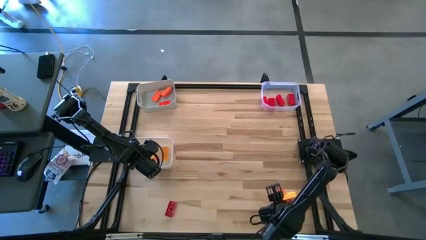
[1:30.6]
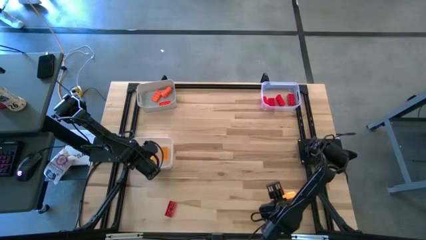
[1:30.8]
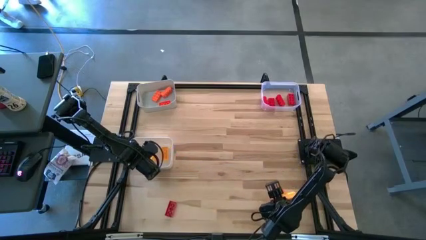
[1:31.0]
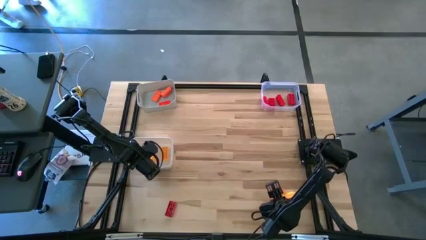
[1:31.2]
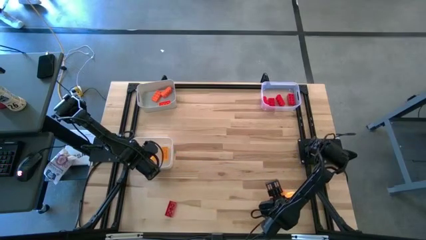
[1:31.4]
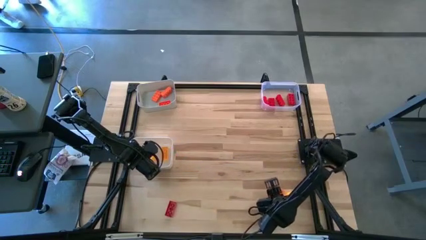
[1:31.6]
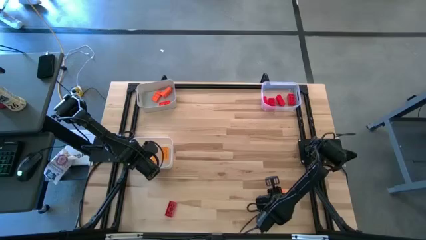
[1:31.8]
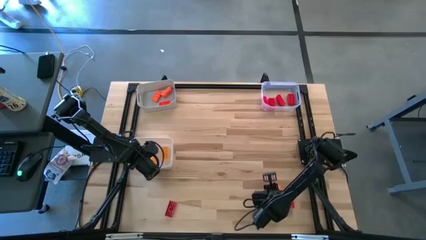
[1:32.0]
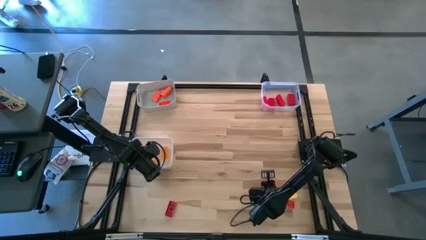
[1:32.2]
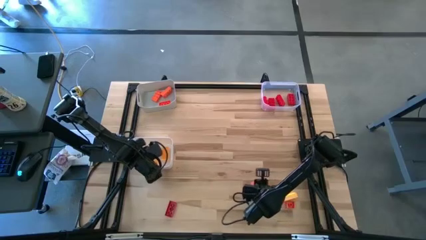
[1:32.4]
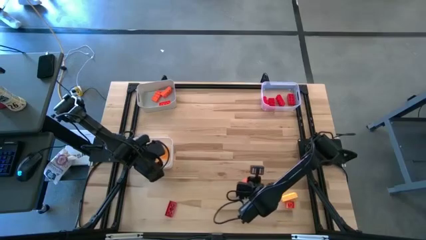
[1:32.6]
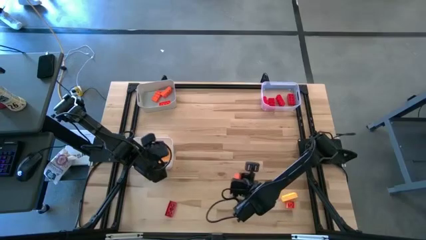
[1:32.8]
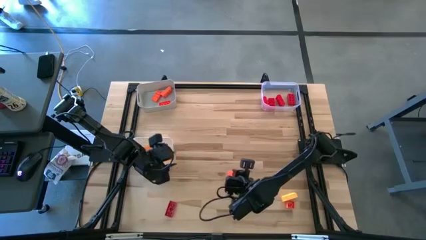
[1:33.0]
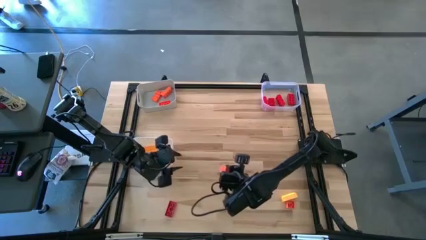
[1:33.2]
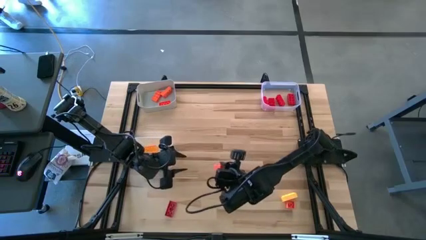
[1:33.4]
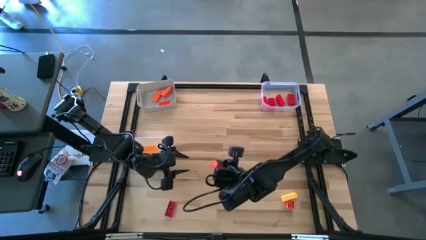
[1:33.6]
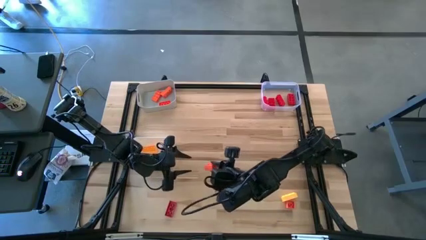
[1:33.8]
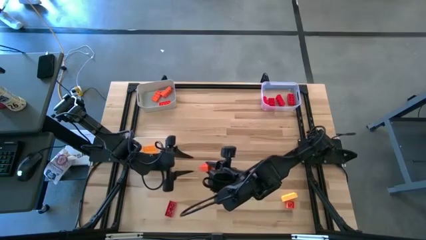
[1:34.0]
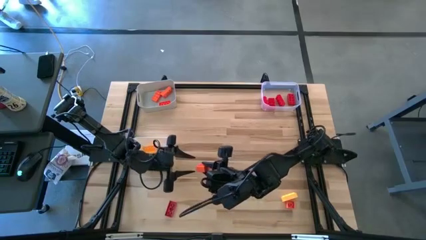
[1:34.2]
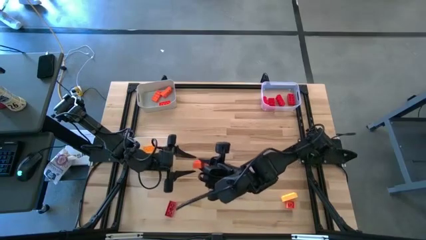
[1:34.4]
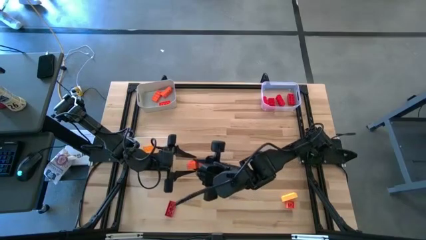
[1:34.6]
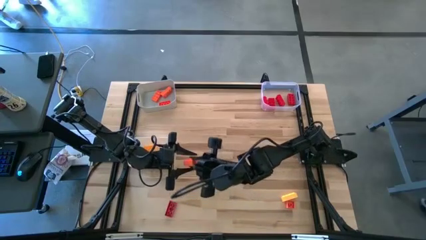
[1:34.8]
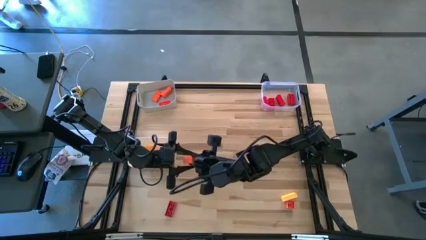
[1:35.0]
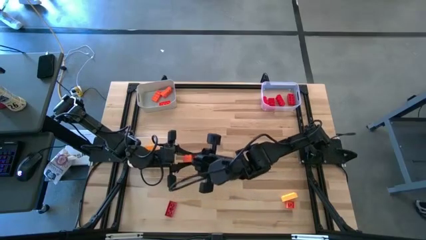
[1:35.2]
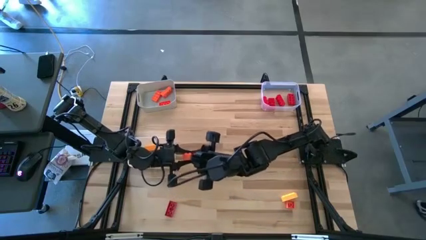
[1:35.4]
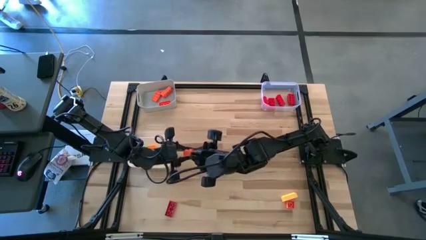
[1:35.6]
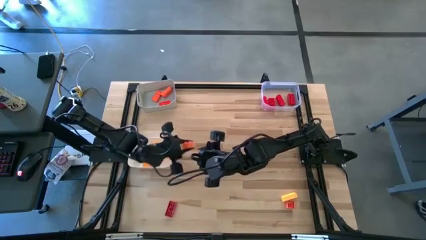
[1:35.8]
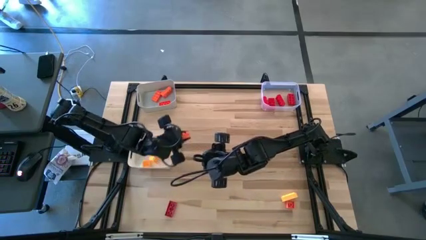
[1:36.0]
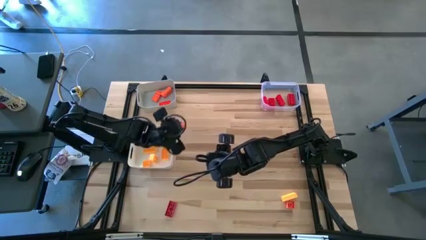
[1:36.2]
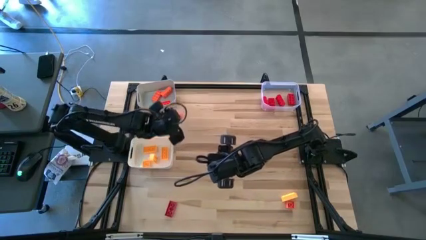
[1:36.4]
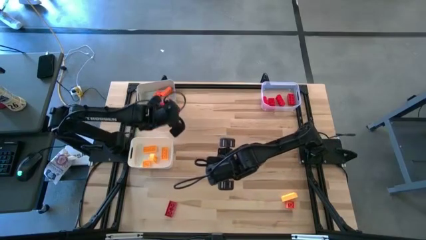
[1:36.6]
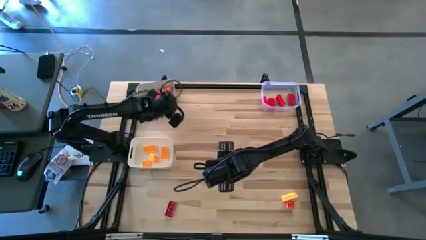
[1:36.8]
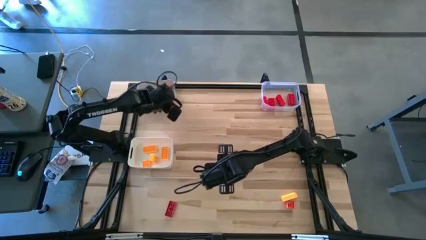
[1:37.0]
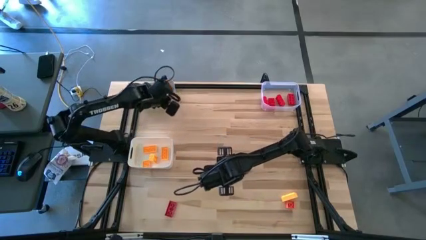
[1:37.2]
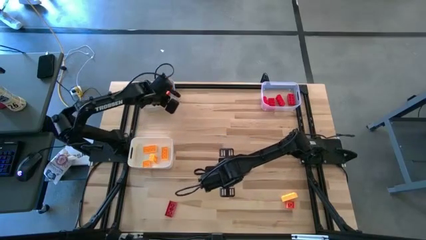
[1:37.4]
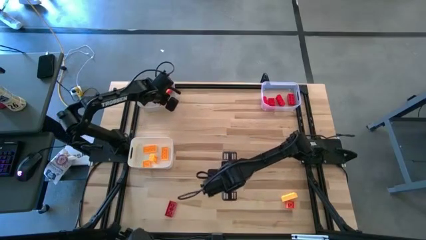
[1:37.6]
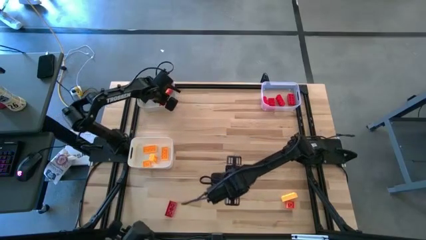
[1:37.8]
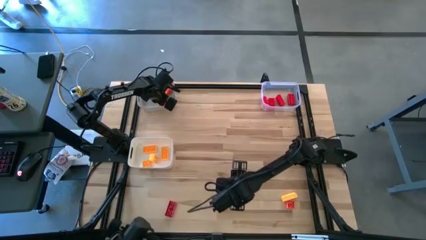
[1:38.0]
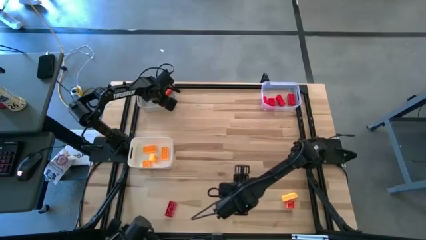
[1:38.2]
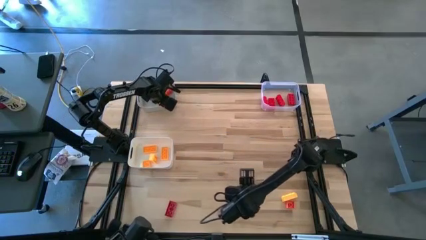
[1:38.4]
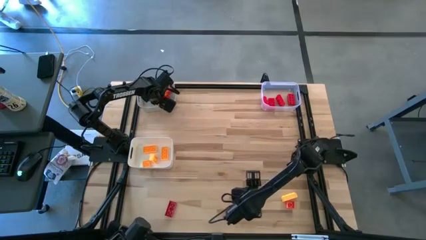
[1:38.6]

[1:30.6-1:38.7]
Task: Sort & place blocks by color
Put the orange game piece into the gray bin

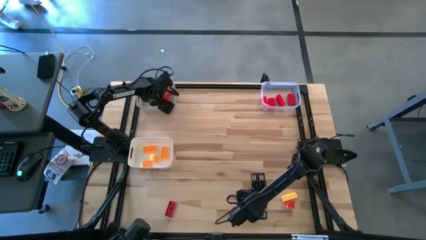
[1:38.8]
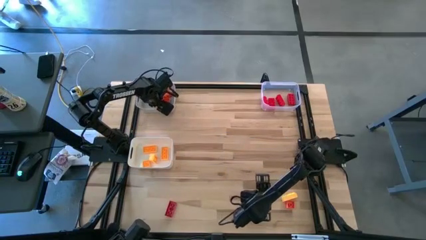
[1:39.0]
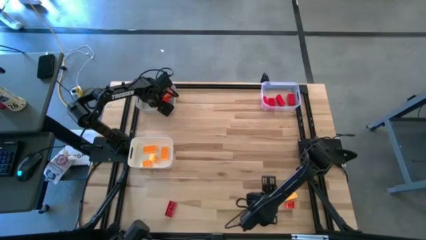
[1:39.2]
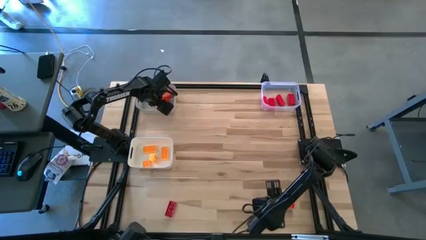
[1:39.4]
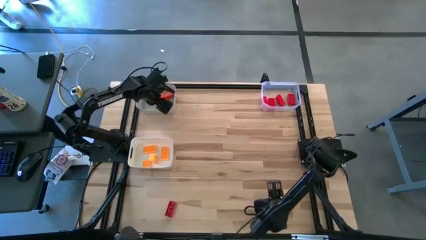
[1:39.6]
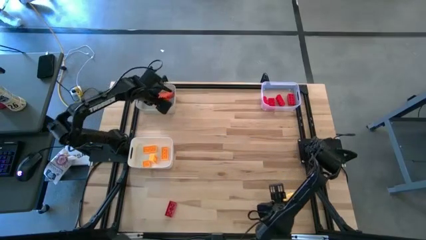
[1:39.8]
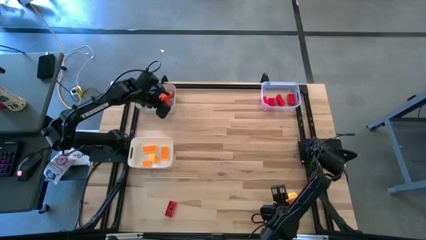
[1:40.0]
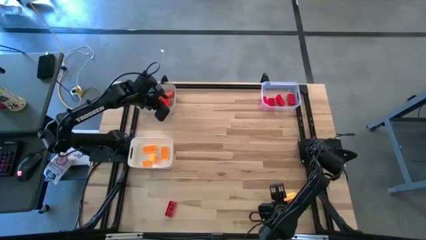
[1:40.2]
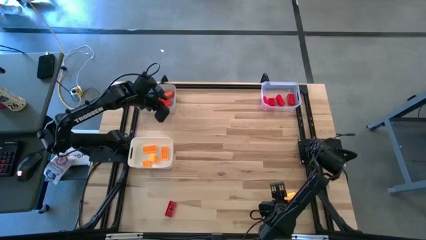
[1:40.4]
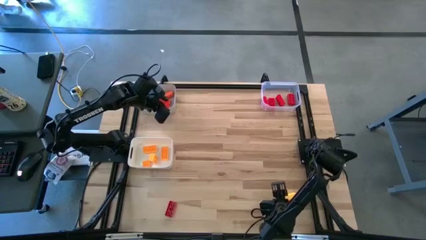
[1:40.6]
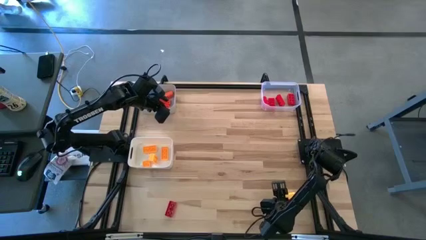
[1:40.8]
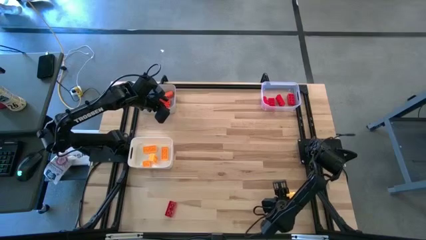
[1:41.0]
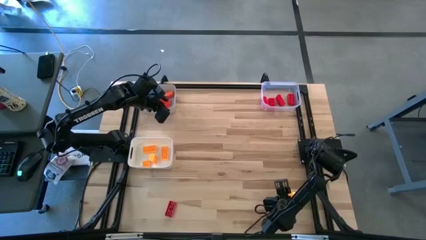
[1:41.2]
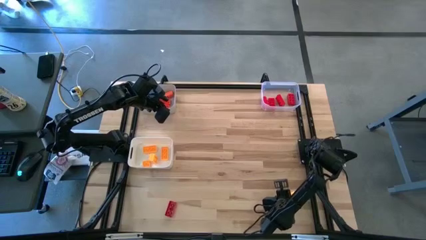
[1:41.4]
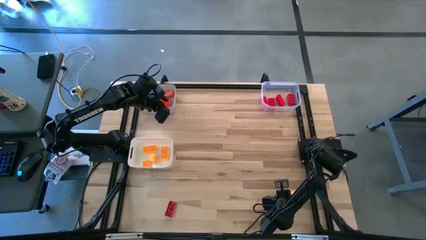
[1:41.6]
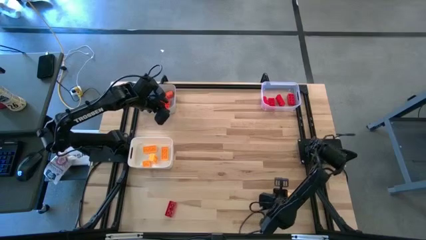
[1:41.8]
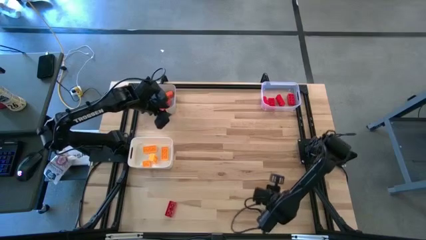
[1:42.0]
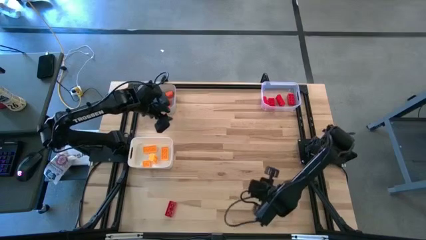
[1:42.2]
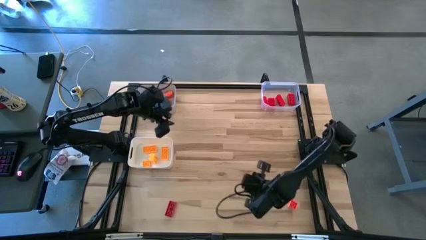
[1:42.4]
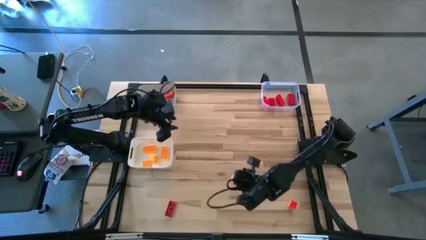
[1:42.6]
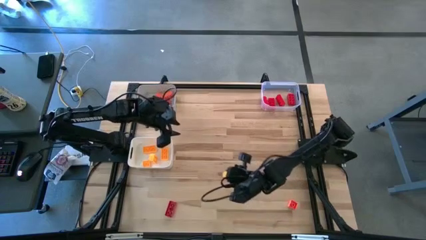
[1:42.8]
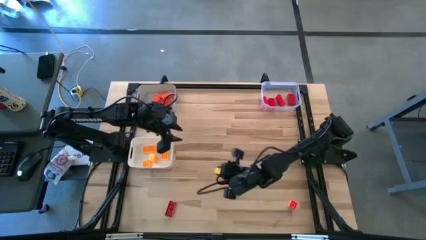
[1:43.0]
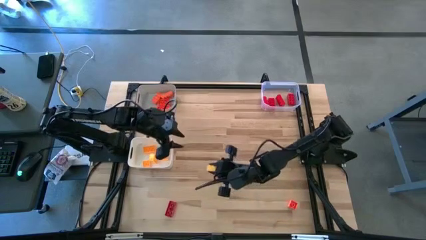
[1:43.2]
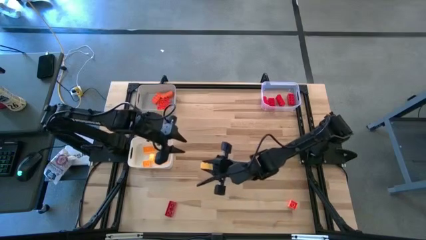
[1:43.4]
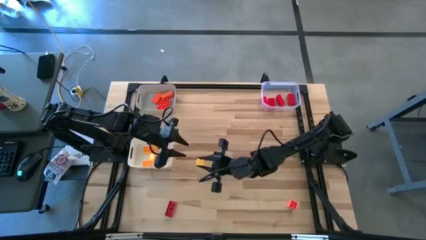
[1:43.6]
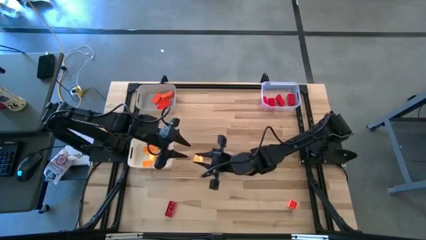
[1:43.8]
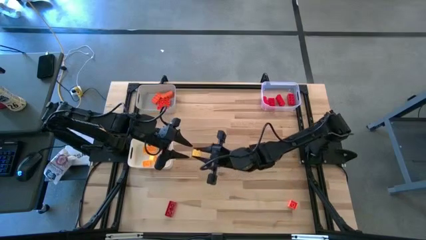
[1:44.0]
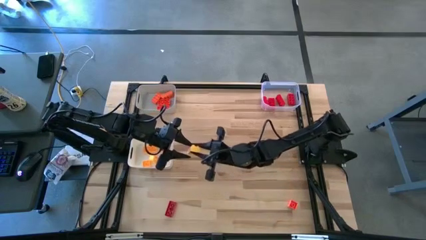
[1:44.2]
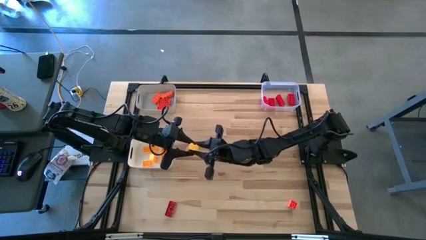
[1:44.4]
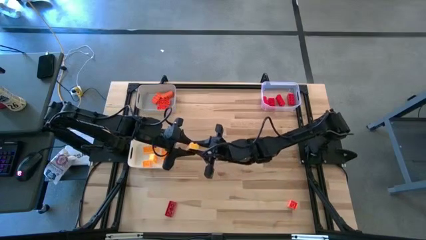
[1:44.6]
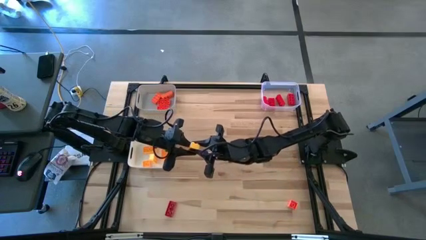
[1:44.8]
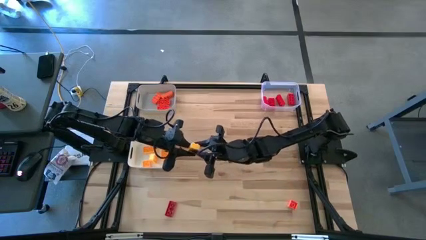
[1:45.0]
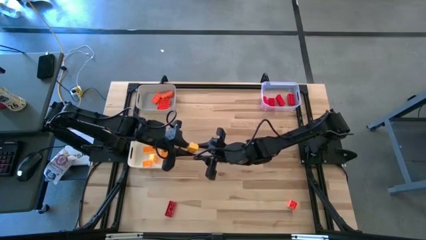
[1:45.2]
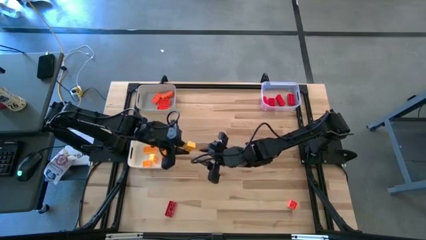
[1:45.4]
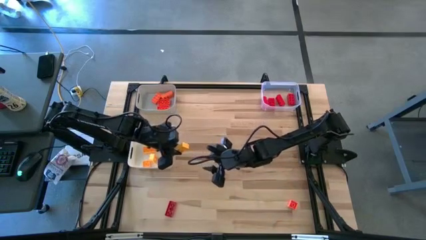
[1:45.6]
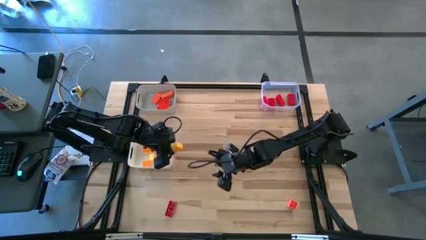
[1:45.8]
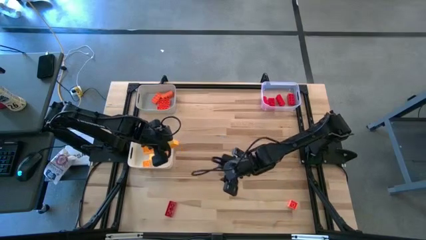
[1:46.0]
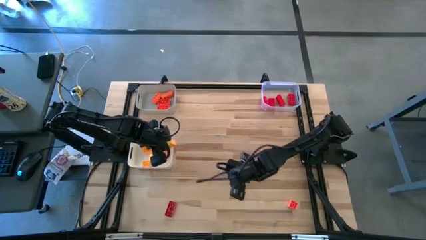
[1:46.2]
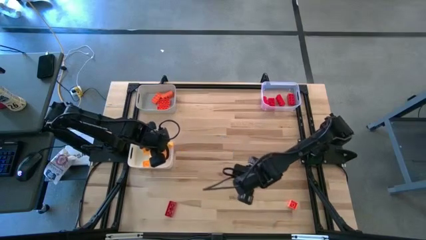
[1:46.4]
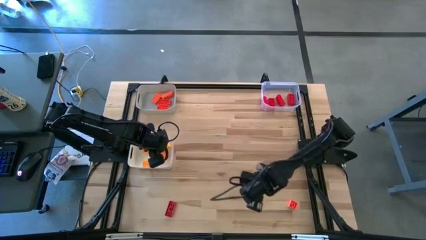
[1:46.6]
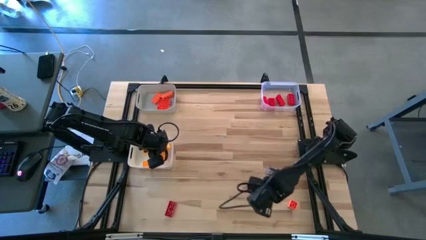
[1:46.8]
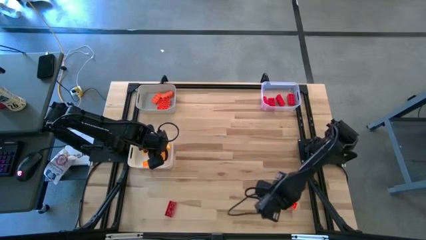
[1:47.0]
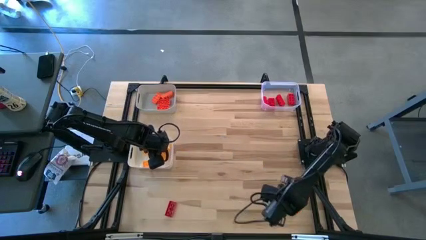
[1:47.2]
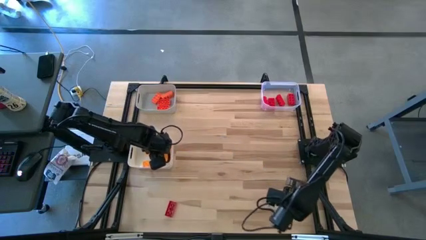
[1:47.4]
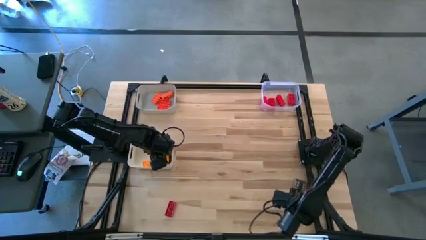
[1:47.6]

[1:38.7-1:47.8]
Put the yellow game piece into the white bin
